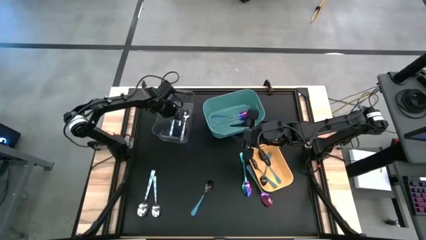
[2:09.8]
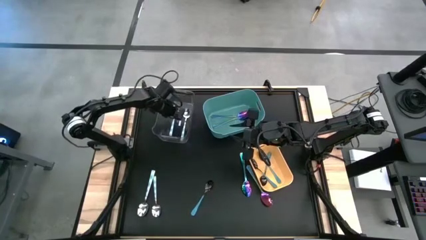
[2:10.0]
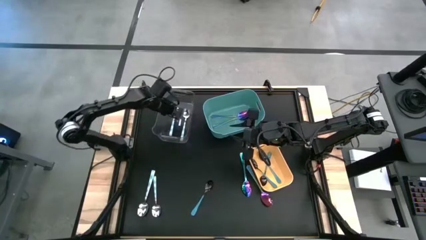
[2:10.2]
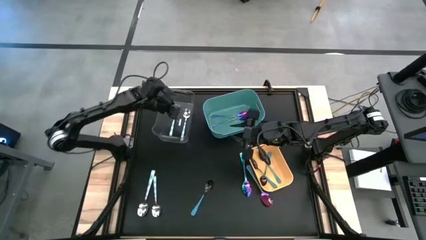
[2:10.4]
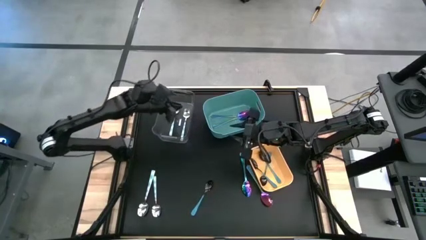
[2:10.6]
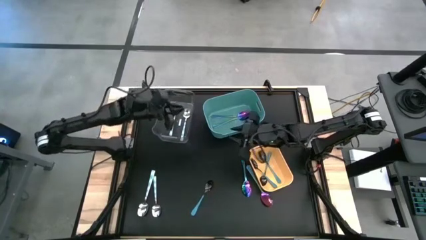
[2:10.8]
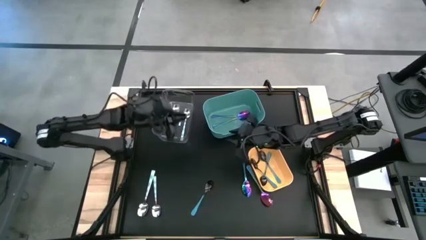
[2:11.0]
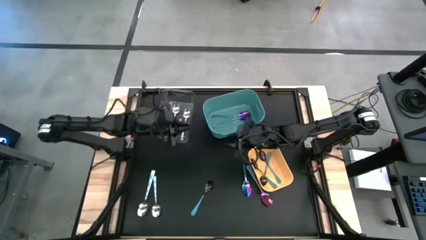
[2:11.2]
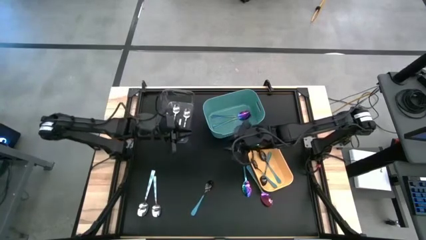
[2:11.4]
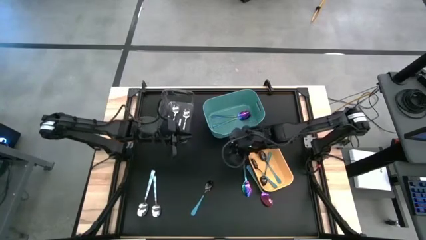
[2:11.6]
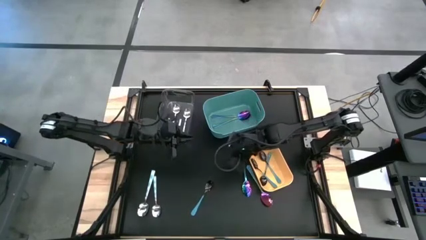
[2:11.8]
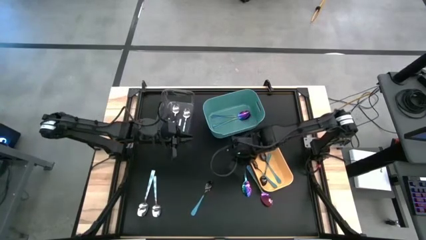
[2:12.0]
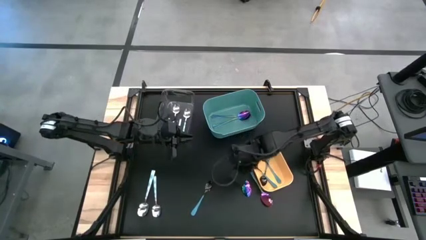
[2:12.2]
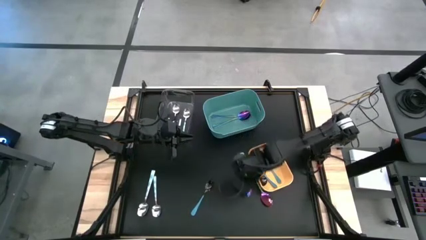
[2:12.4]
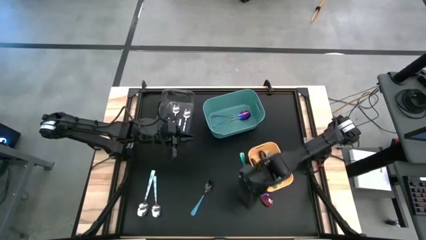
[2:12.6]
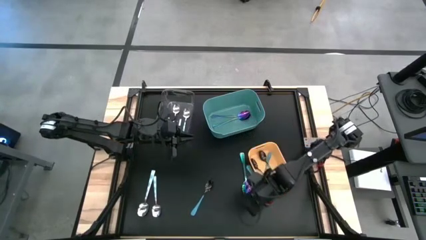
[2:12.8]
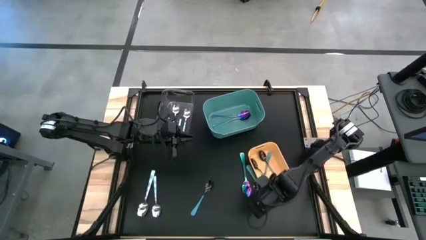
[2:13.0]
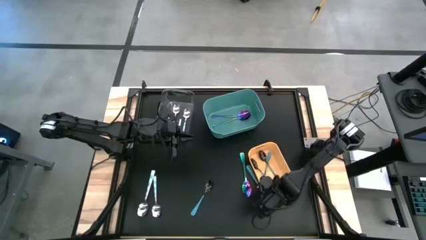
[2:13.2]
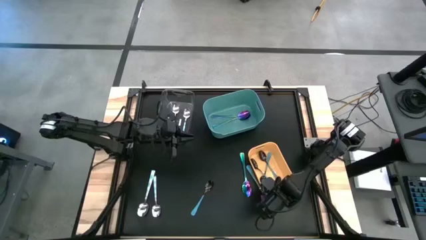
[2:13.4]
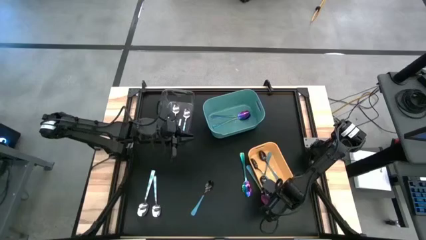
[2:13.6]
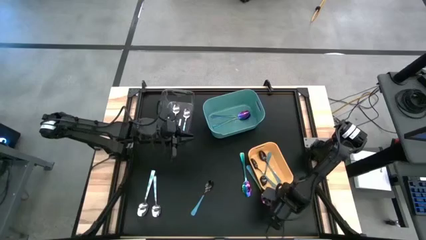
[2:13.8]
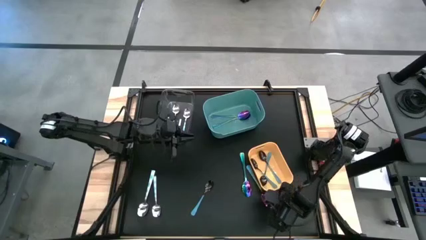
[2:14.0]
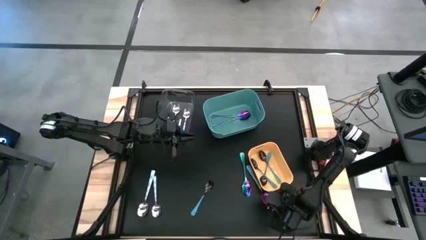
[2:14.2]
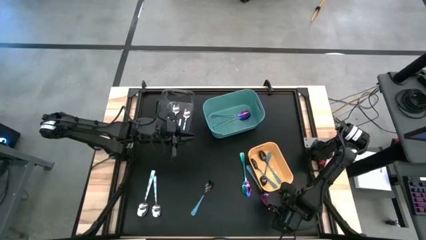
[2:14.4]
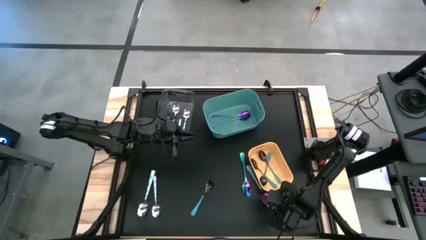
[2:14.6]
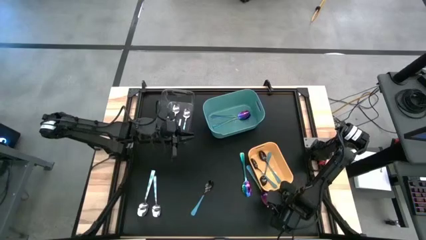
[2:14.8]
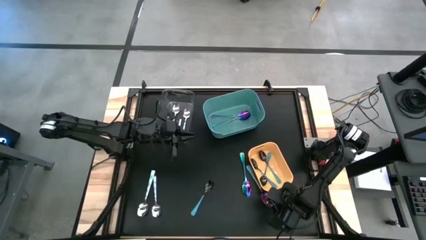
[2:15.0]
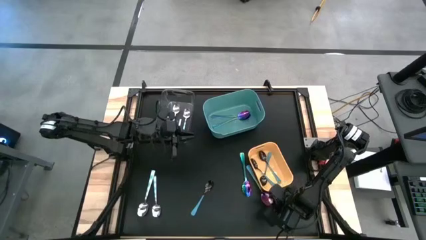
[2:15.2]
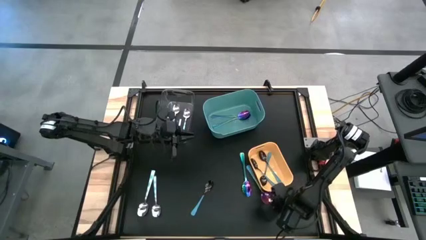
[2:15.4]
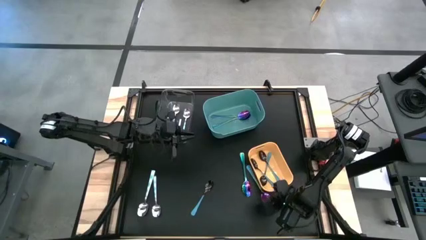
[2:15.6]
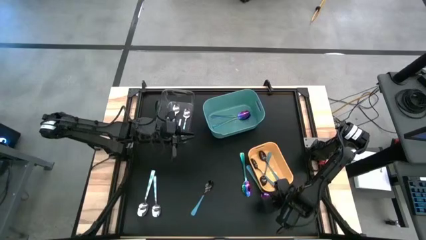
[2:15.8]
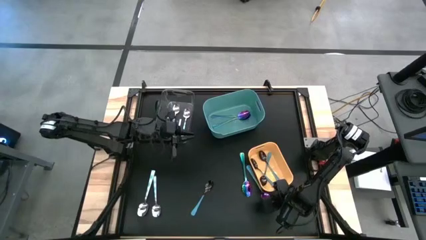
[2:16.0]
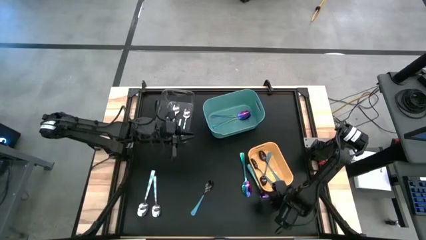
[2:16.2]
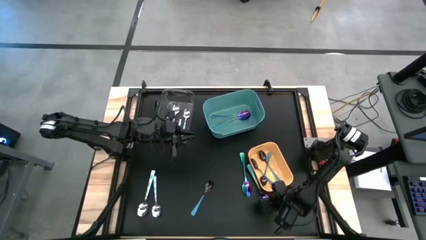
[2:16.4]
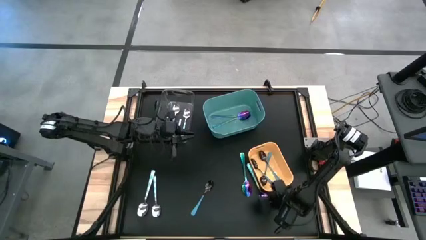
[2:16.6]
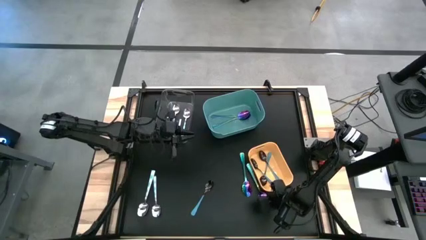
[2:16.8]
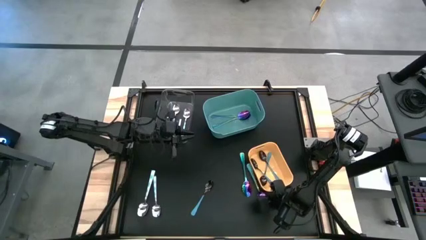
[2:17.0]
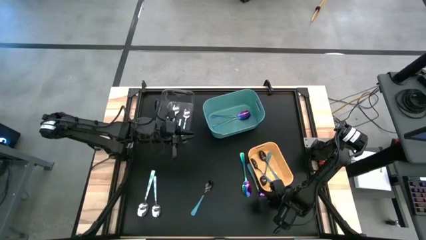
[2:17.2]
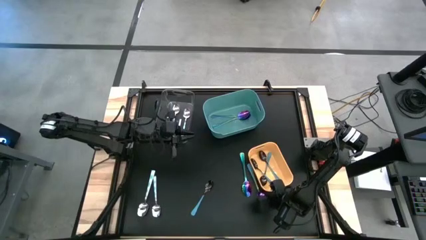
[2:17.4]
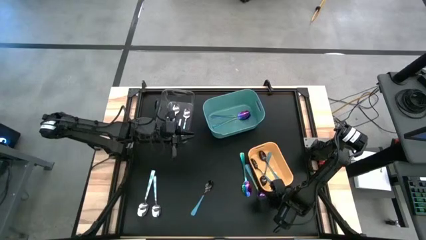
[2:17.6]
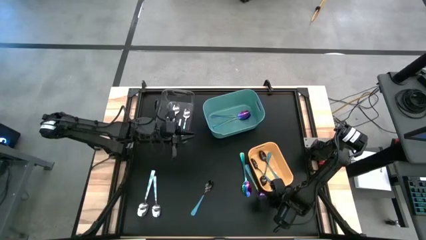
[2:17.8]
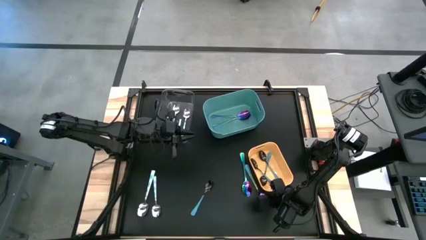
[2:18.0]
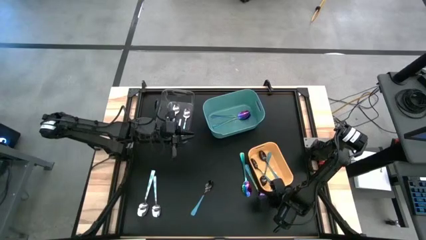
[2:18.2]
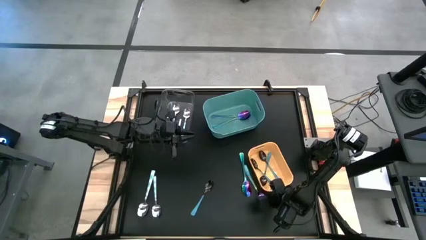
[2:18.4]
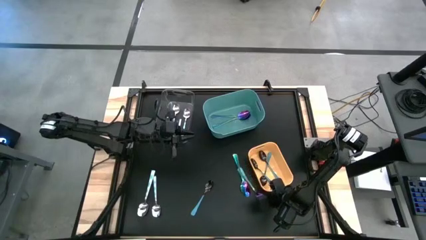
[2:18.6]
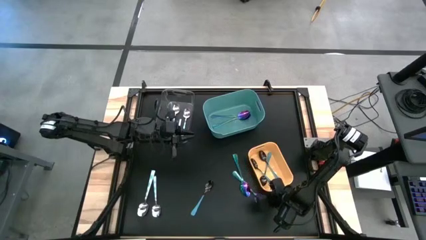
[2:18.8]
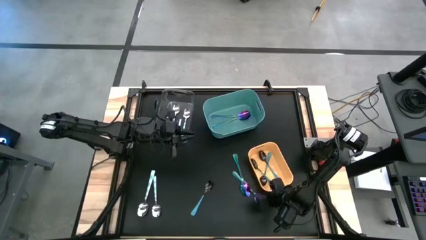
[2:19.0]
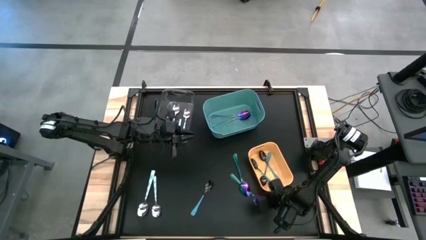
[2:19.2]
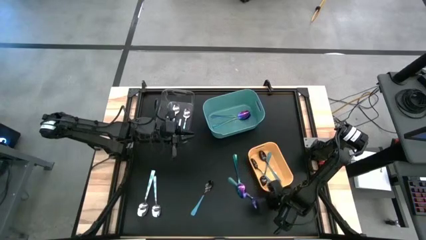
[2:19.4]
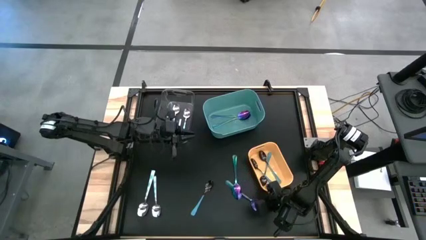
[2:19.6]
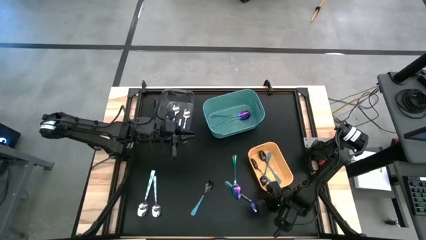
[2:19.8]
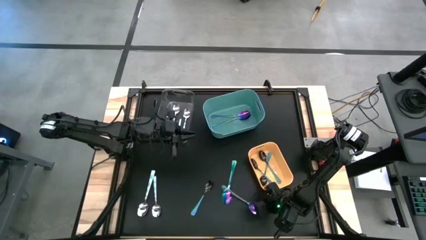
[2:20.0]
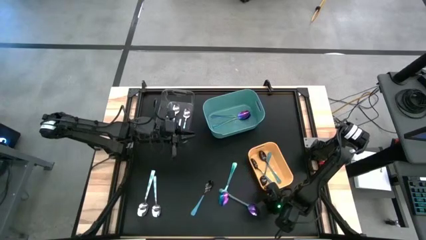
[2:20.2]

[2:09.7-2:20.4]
Task: Sort silverware by color (type)
Put the purple spoon into the green bin

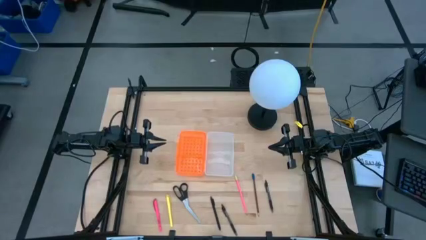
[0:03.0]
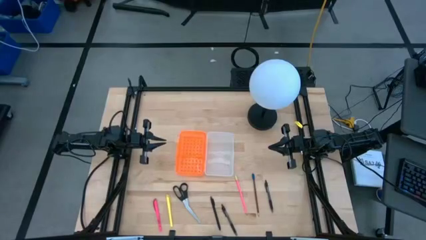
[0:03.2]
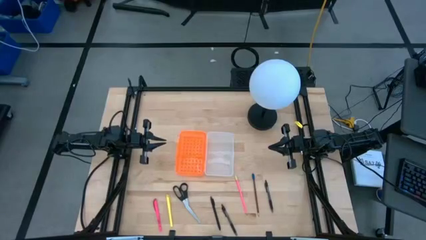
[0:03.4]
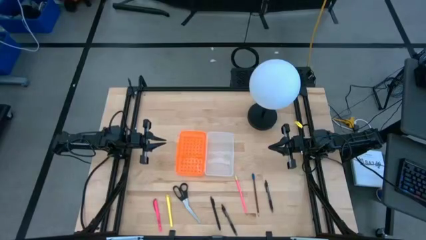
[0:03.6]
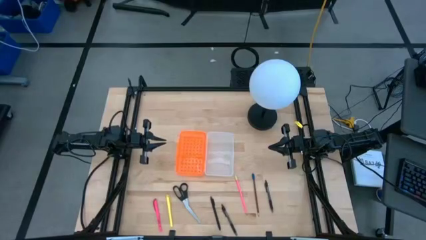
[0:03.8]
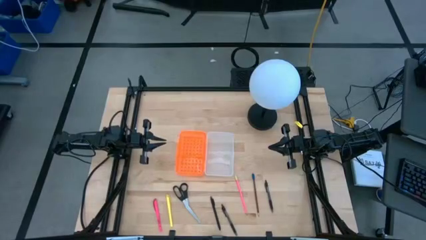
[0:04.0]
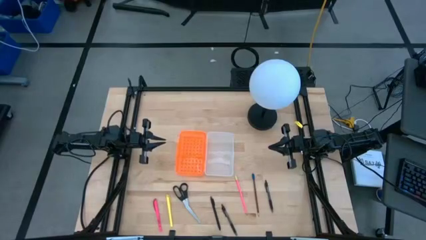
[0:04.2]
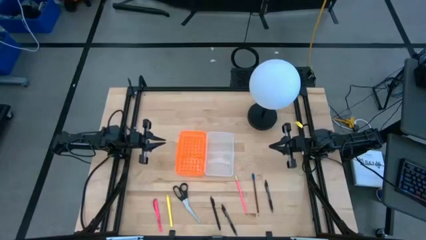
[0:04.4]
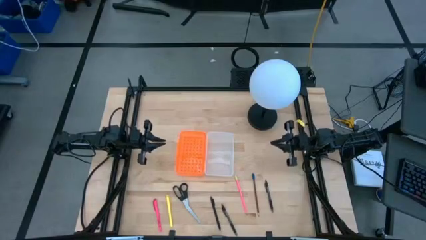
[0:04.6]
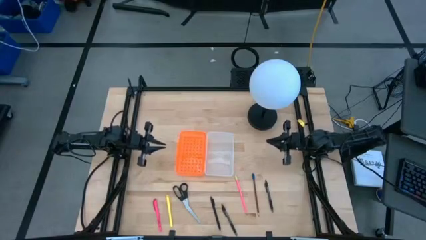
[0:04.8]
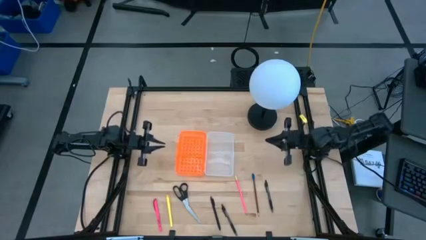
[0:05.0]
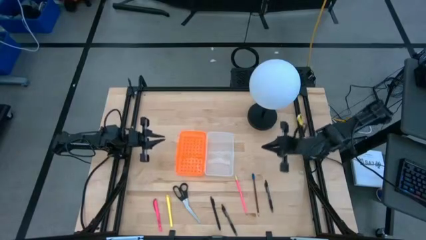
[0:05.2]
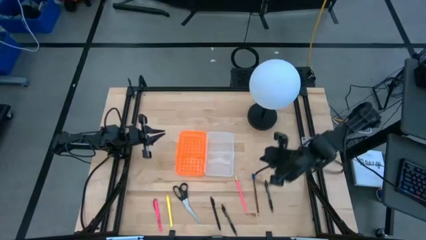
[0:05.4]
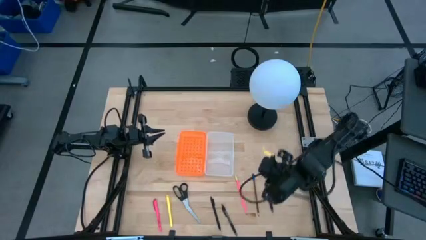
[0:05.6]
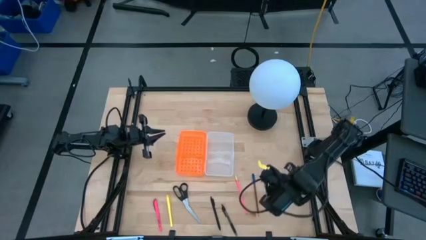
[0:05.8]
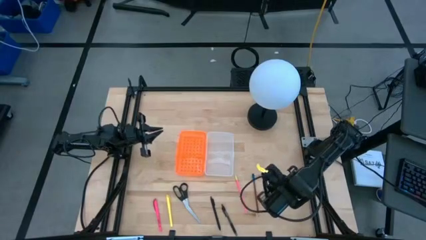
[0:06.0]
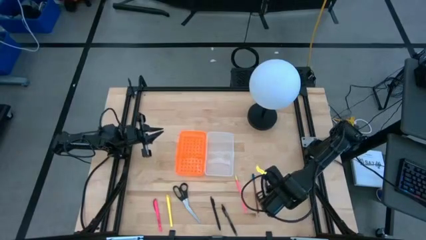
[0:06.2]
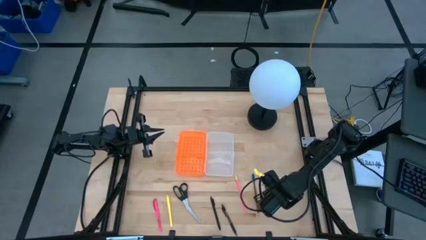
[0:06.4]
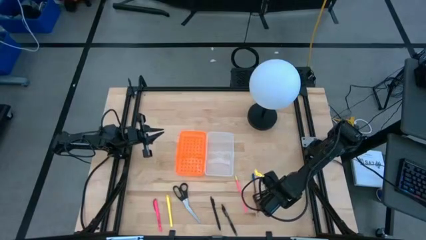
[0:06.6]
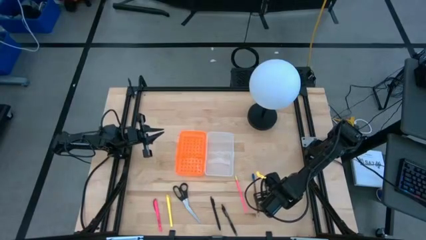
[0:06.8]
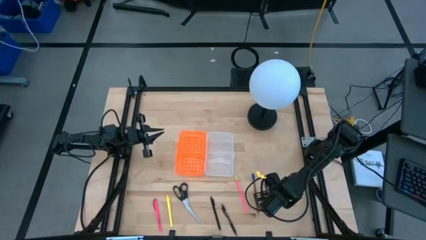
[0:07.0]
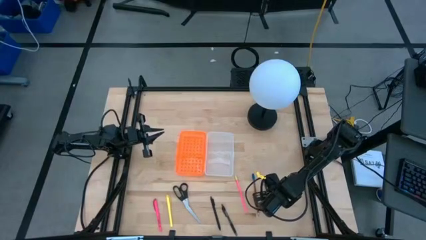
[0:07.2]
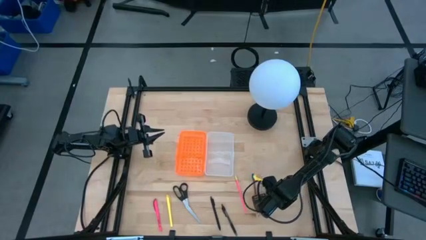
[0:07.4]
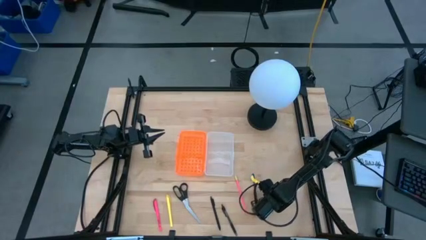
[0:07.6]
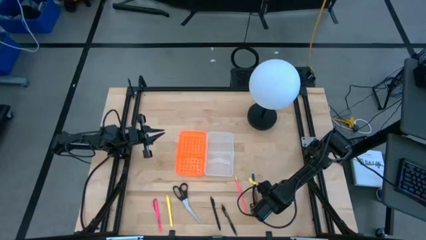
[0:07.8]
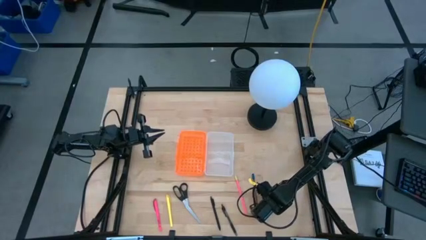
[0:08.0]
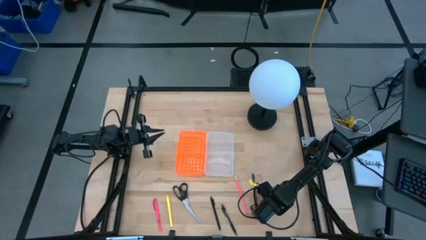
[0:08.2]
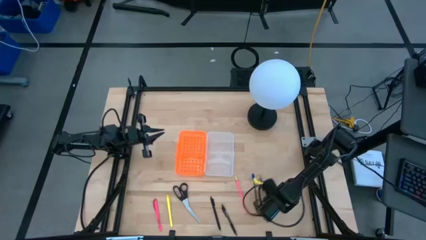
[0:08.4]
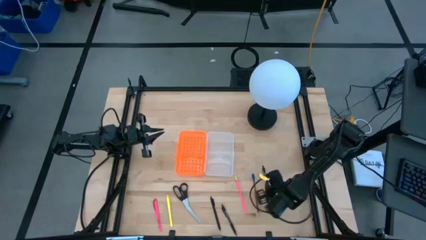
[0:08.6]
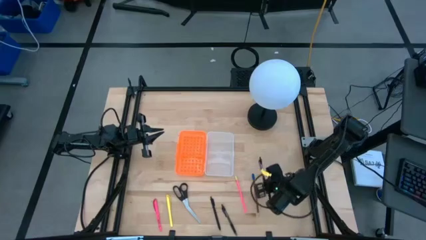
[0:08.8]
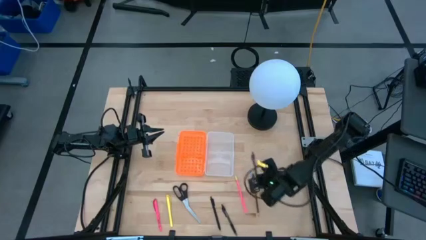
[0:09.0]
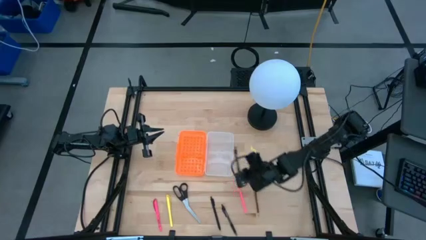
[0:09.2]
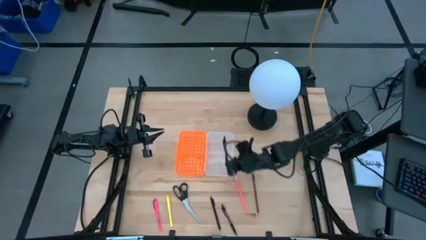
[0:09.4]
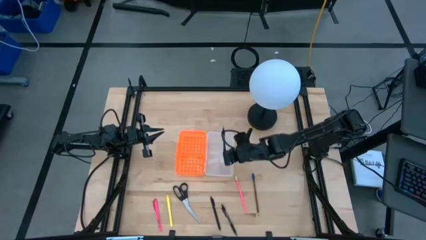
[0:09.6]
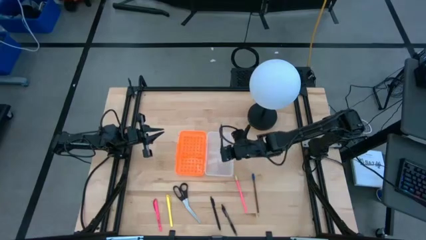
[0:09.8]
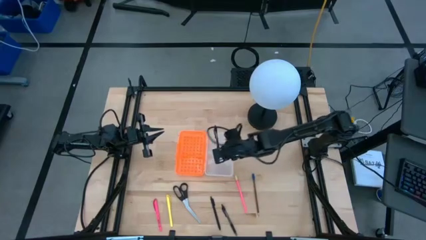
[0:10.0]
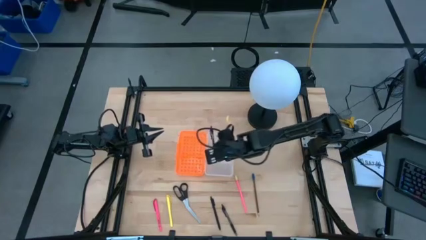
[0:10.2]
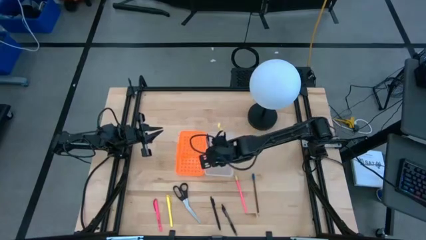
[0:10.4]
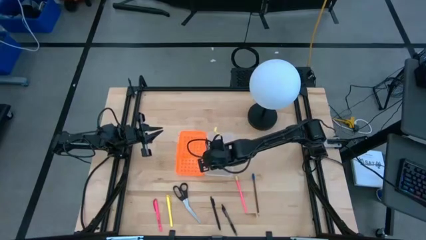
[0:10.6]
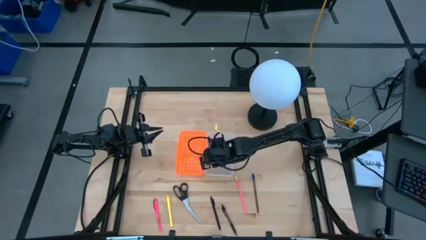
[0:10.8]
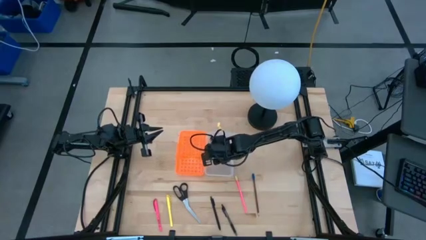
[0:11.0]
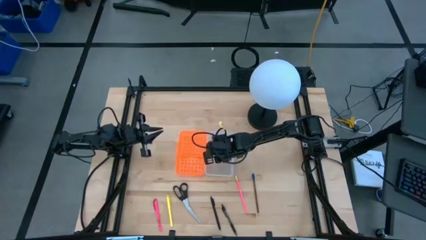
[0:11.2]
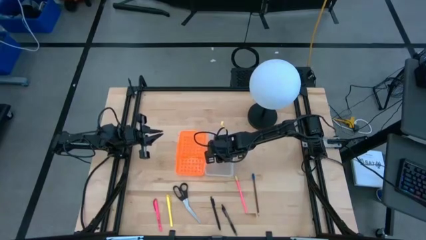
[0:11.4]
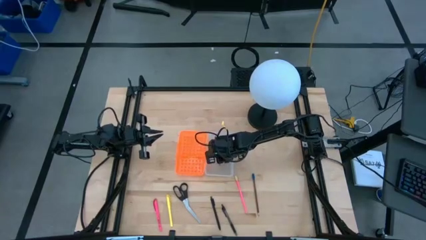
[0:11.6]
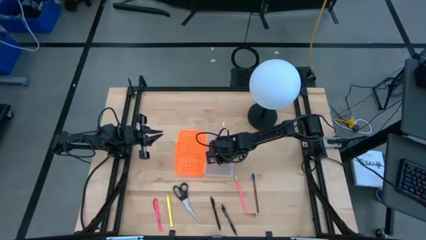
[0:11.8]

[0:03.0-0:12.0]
Task: Pick & place school supplies into a supply box
Put the right black pen into the supply box
